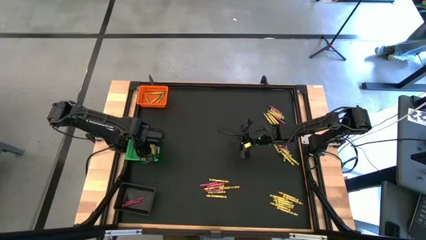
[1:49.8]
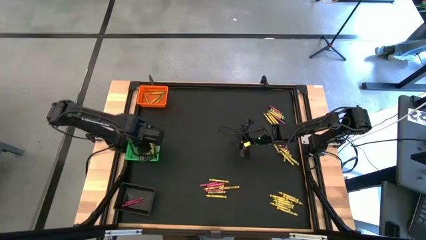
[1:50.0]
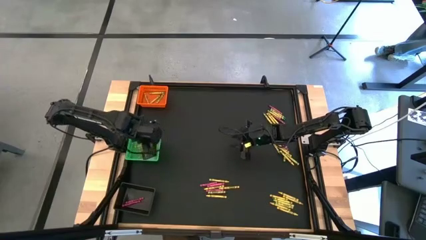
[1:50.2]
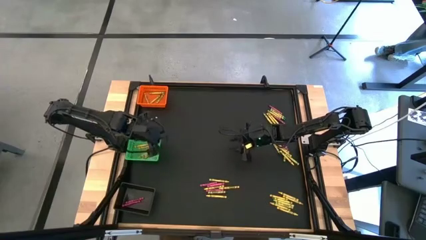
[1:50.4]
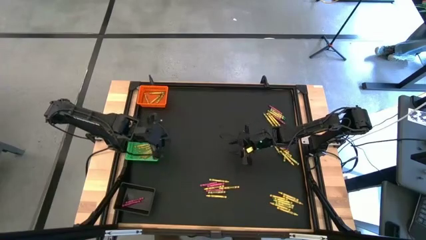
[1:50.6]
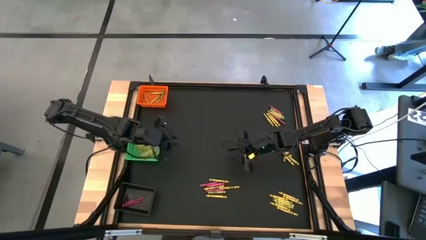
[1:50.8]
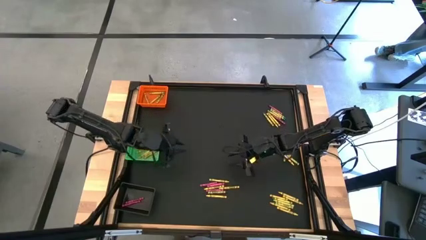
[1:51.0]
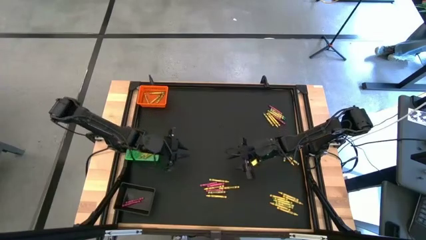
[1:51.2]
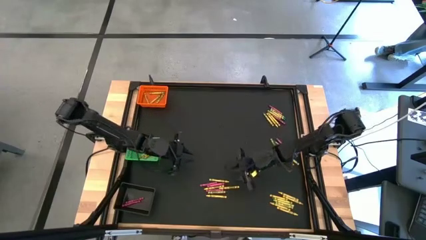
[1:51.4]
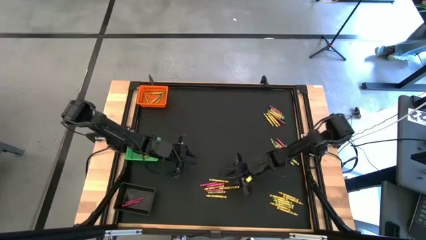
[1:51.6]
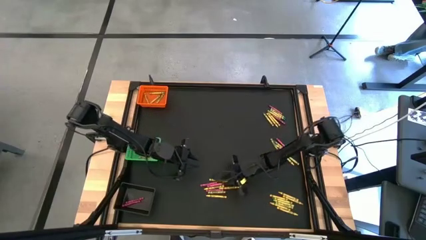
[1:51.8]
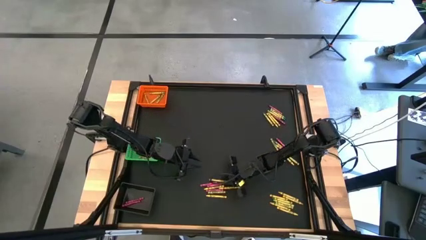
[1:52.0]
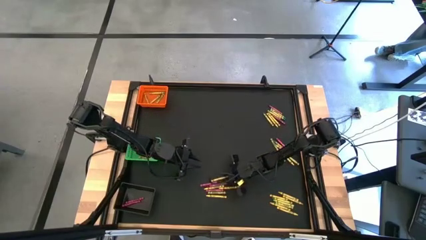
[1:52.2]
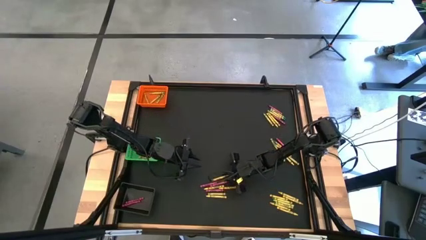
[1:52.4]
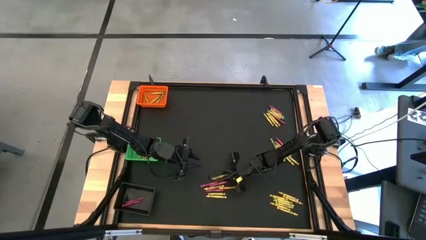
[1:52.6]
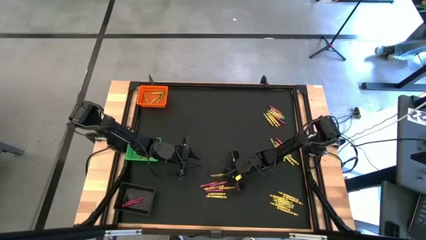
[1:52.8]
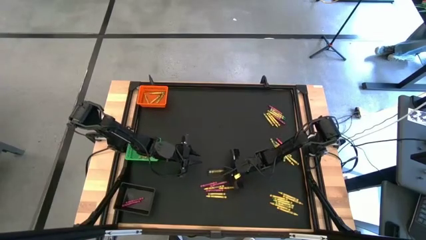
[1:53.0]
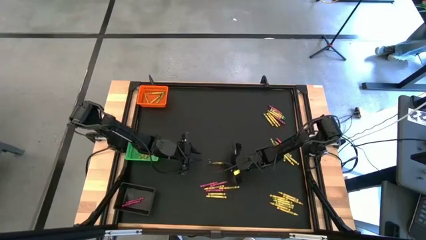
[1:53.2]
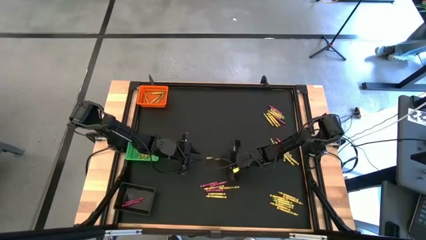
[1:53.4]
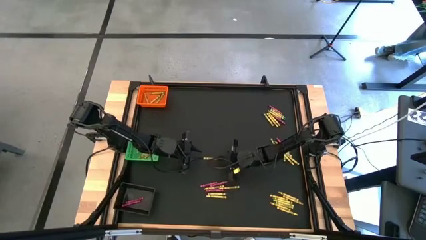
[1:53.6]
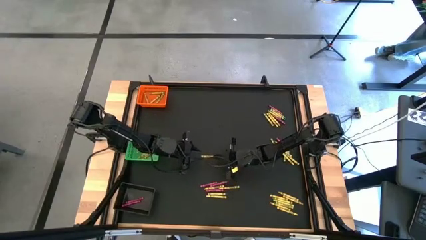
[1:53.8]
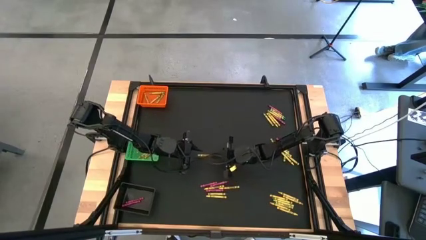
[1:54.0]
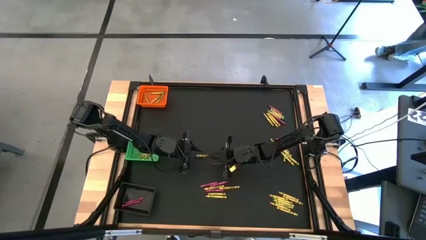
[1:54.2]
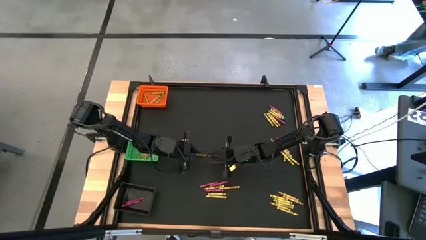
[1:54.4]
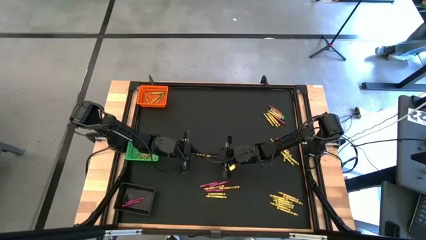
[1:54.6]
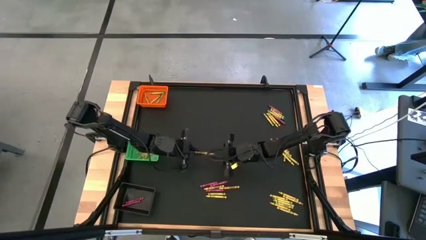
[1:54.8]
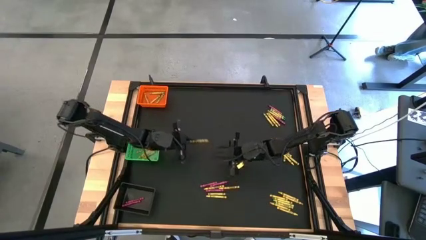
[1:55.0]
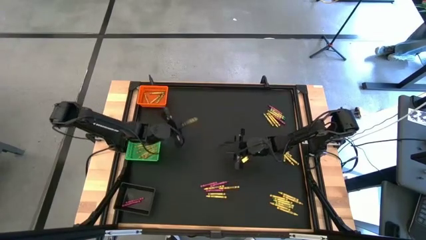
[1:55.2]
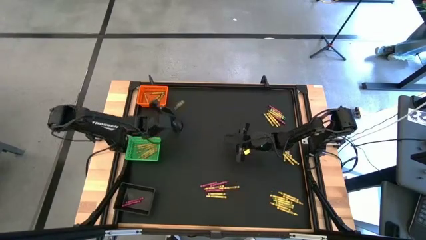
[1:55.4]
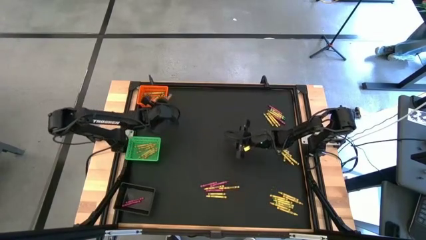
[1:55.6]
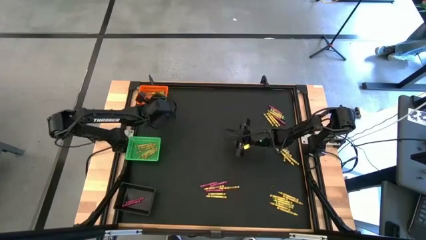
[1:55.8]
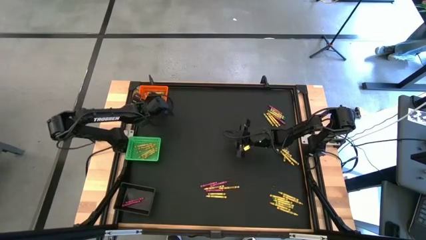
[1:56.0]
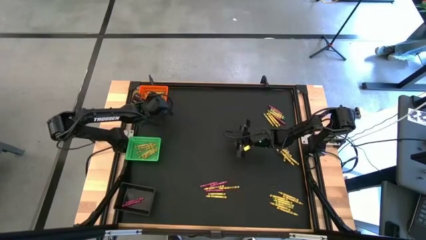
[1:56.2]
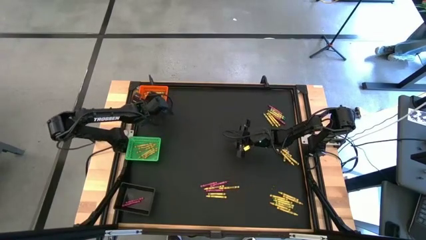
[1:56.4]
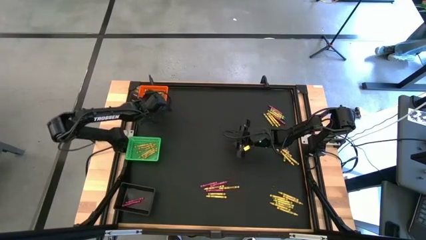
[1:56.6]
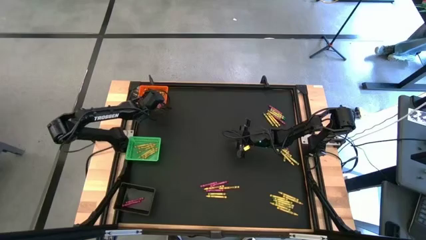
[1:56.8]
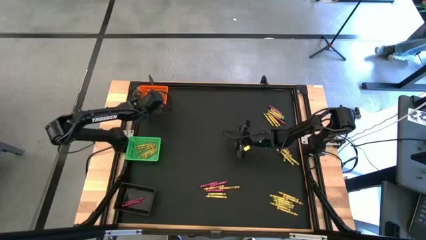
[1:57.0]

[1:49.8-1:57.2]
Task: Sort crayons
Put the yellow crayon into the green bin

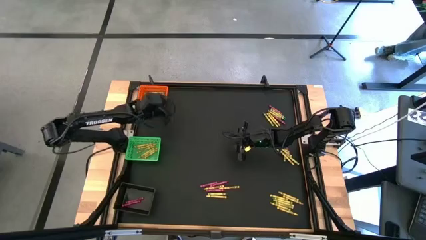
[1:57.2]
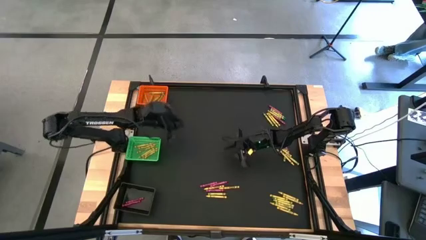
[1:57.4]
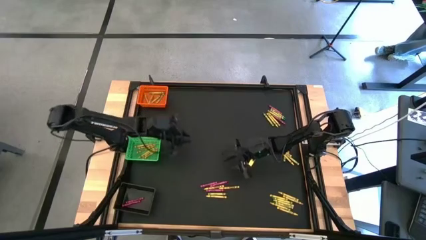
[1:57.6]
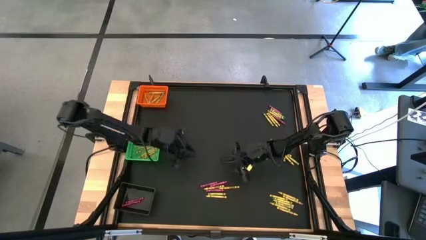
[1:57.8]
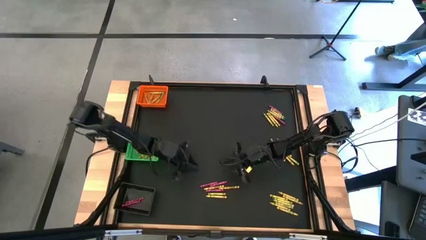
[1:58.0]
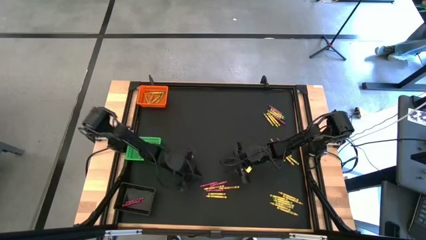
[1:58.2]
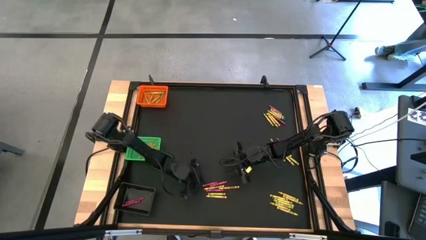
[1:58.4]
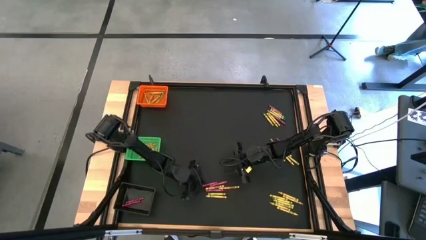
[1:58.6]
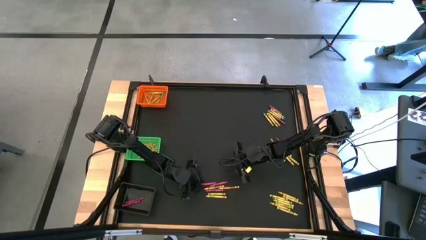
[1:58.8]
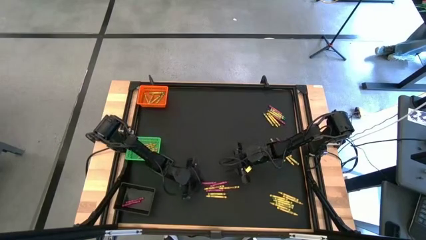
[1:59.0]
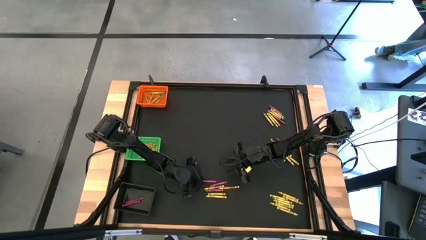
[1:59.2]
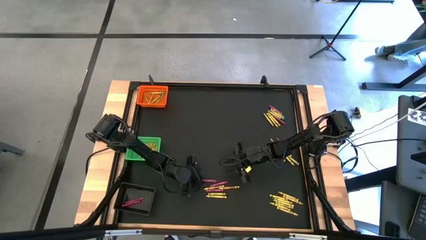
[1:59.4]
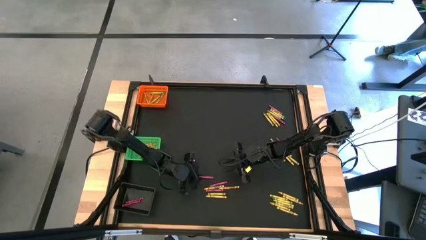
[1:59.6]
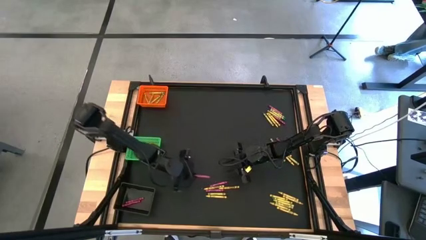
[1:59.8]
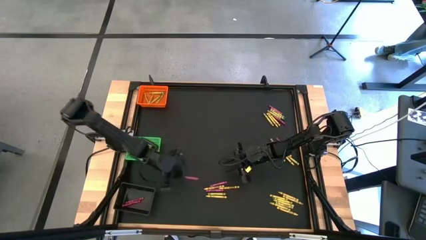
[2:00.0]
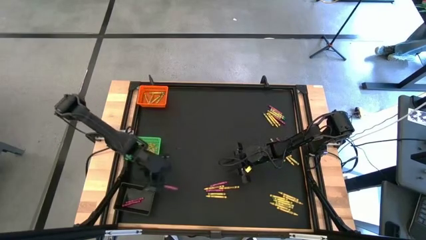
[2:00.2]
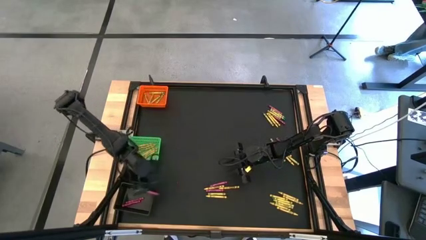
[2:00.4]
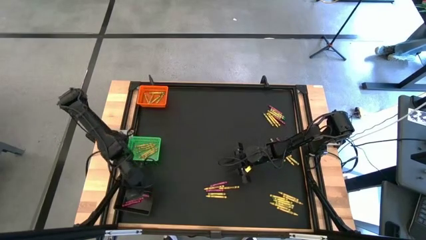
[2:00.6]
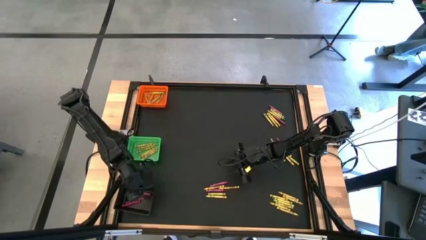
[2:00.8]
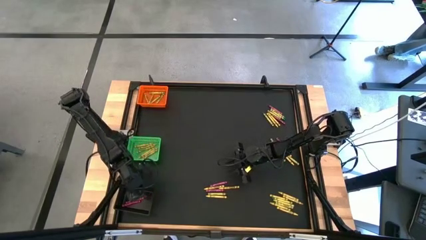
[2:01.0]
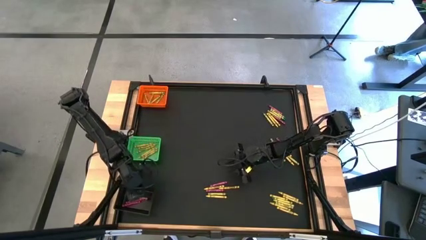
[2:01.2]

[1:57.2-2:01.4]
Put the pink crayon into the black bin

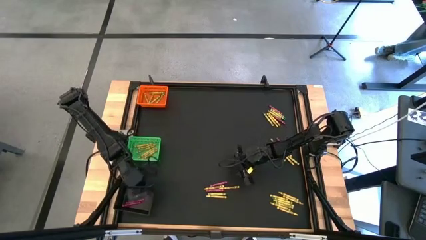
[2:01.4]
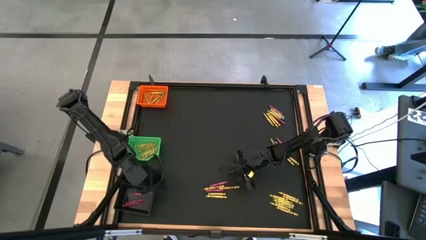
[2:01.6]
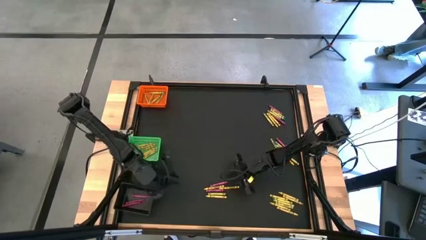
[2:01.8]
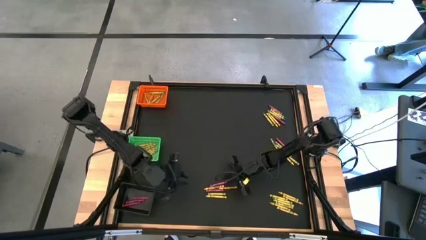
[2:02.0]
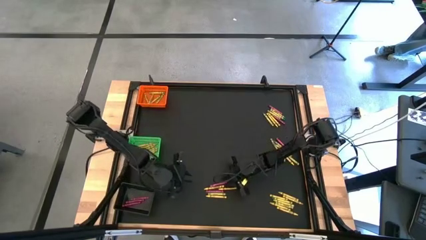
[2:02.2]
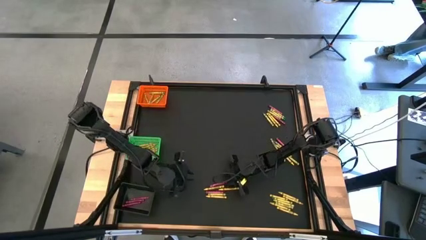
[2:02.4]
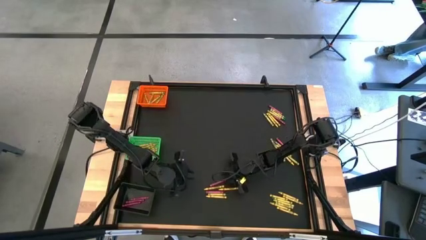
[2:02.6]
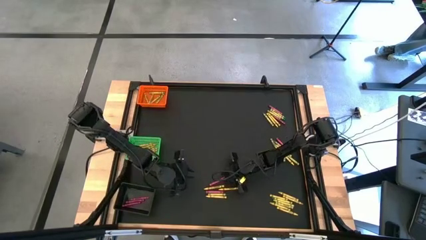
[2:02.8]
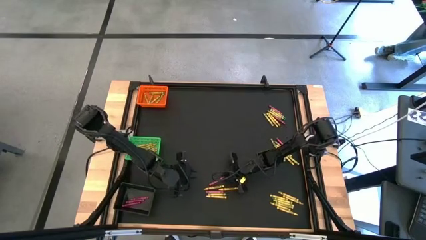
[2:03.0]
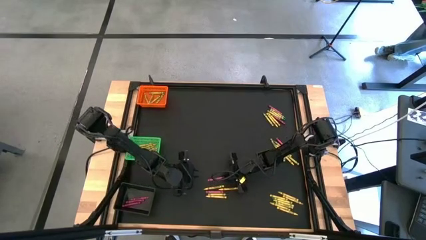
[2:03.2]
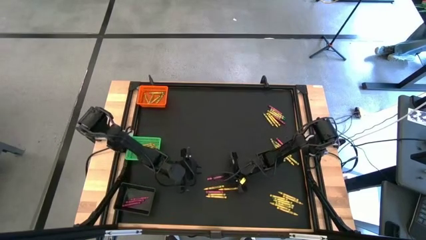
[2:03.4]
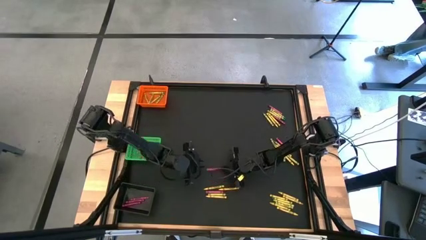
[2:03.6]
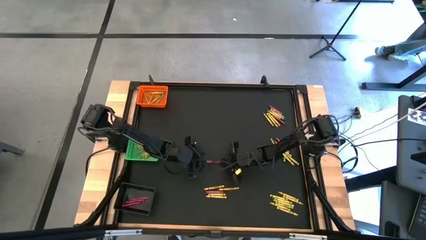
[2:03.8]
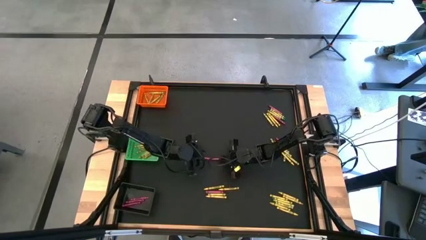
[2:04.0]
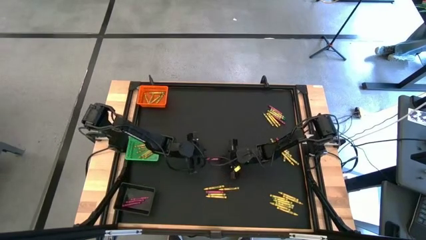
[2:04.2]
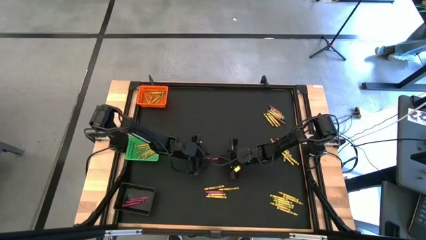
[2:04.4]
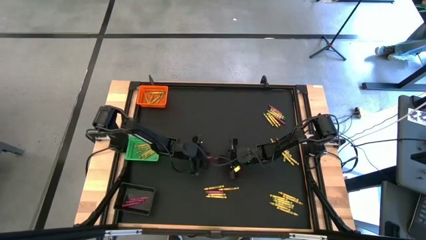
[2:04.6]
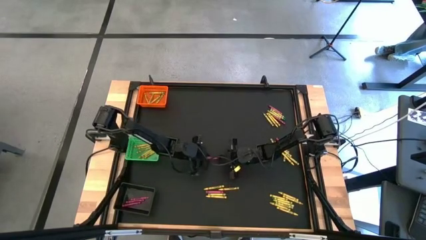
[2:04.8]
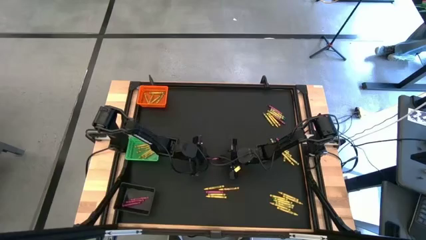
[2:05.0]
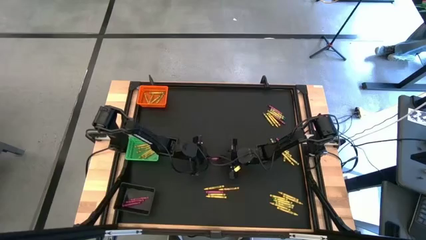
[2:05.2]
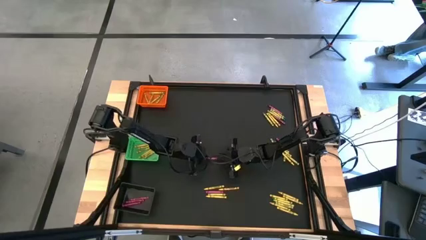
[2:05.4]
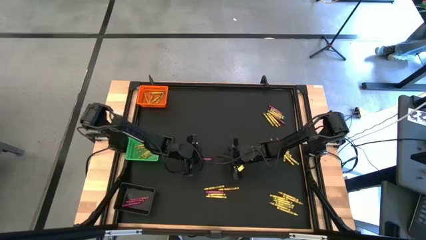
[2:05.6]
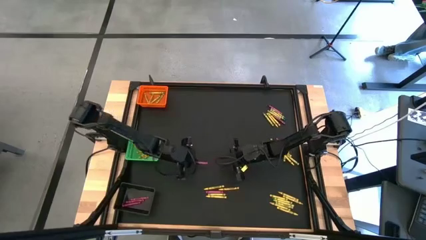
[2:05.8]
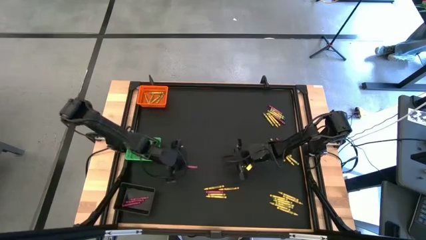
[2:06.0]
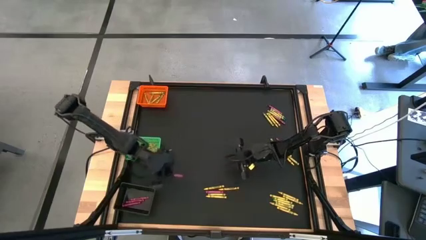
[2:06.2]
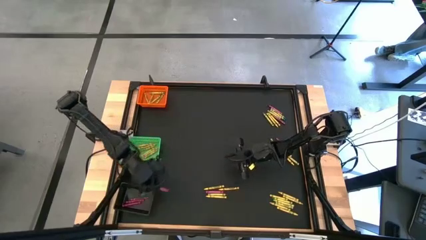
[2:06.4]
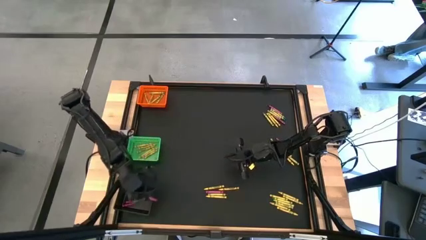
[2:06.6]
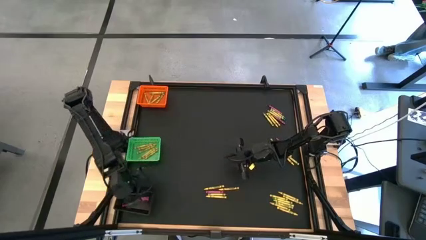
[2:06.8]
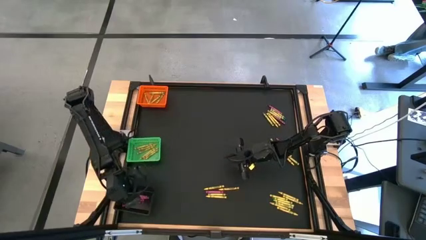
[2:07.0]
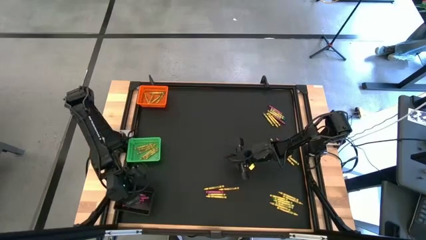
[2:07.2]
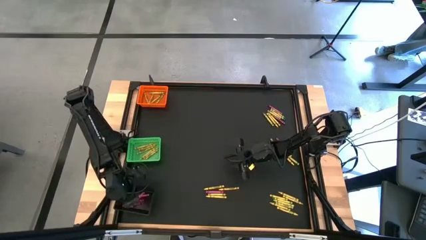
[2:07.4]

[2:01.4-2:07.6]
Put the pink crayon into the black bin
